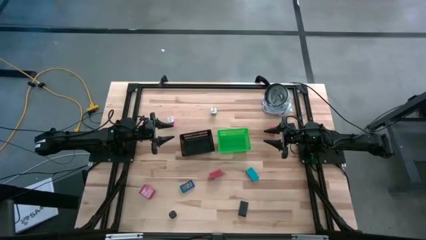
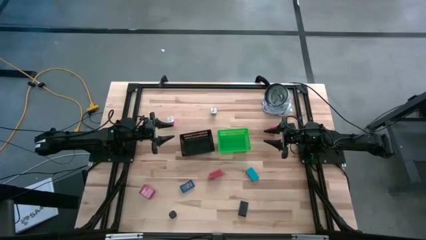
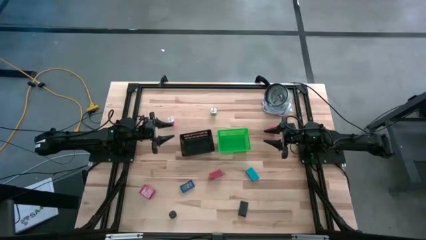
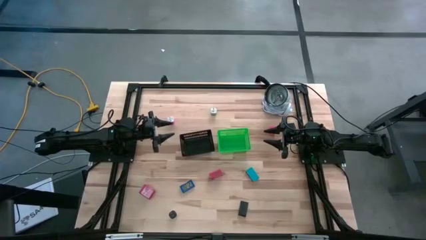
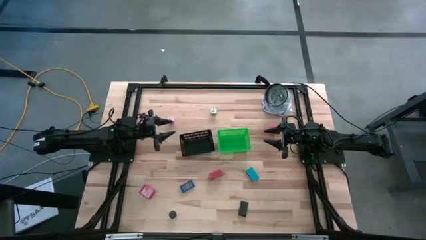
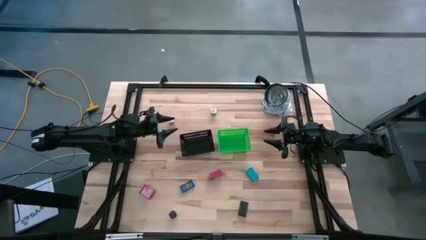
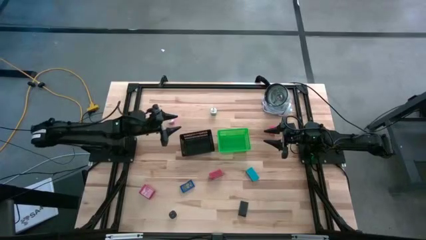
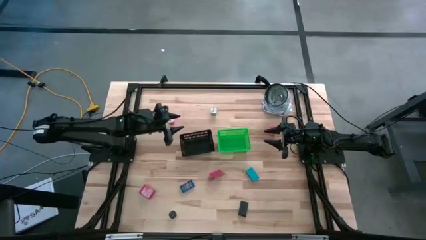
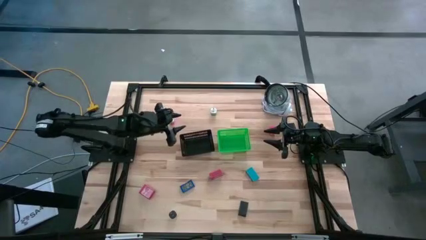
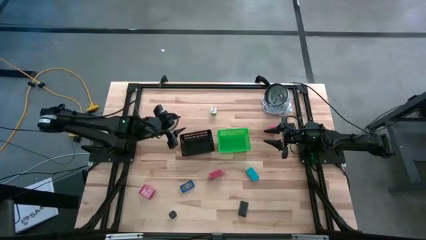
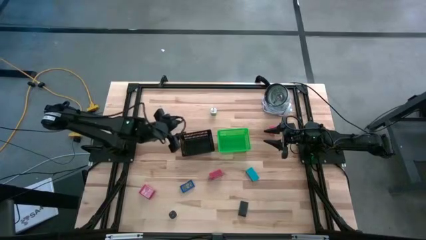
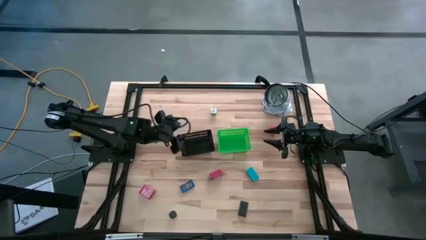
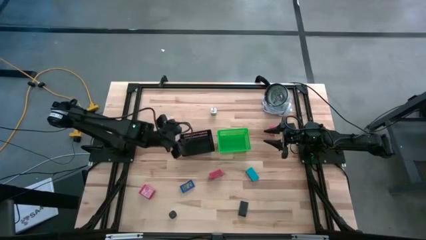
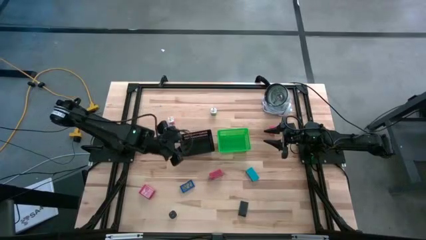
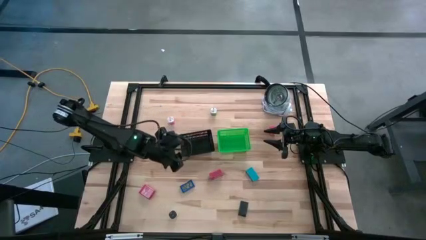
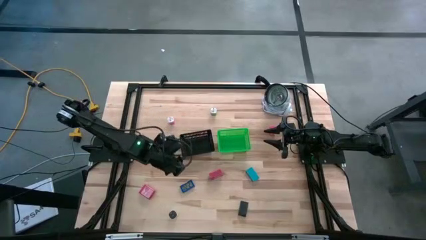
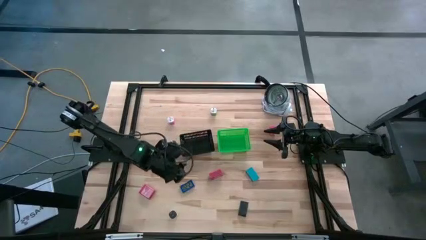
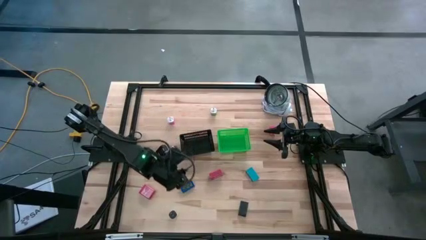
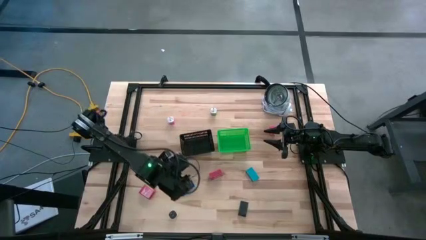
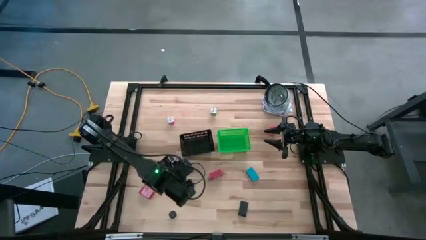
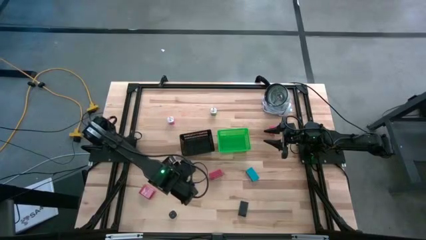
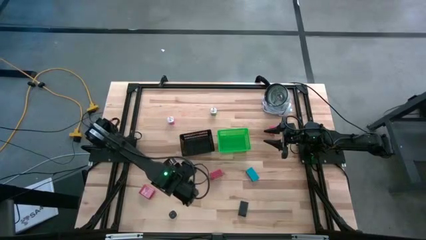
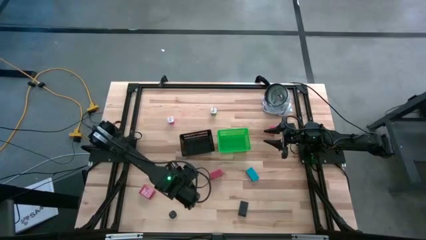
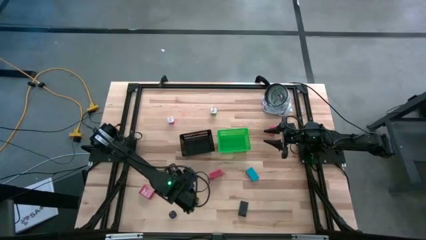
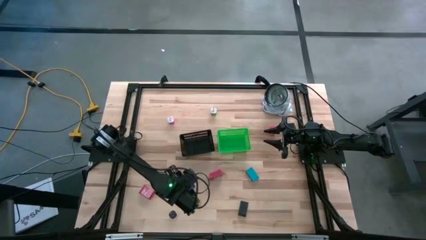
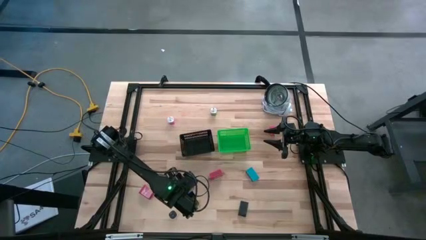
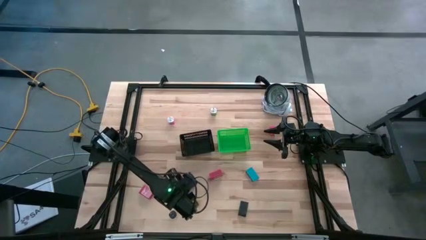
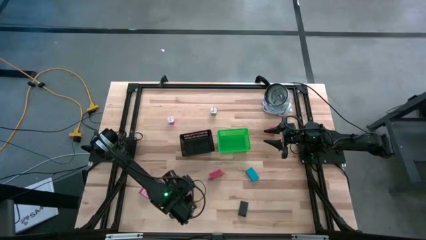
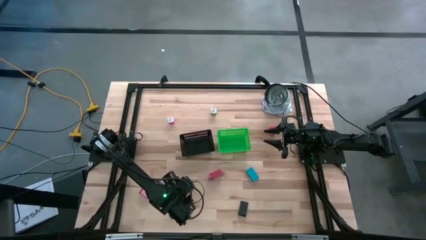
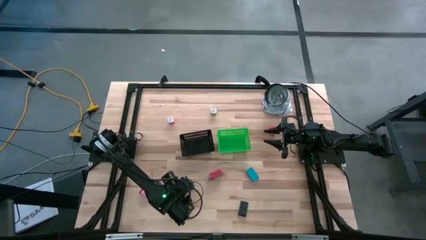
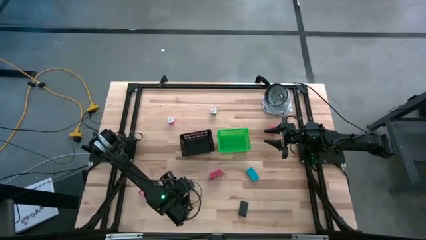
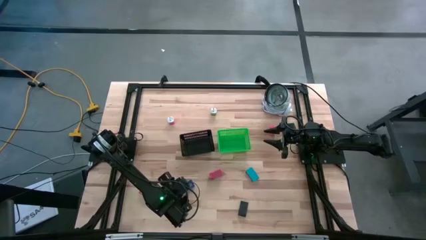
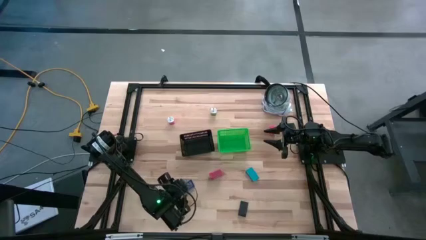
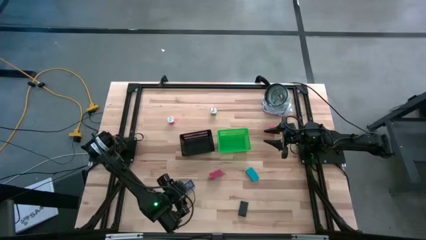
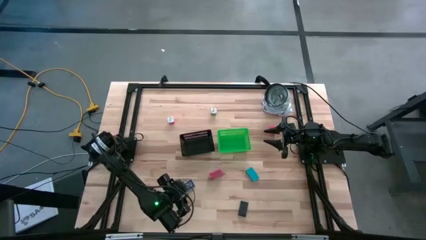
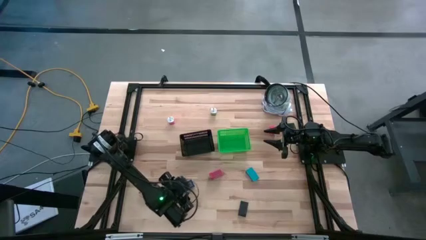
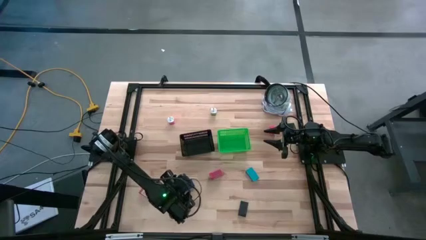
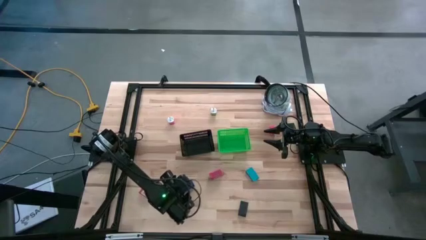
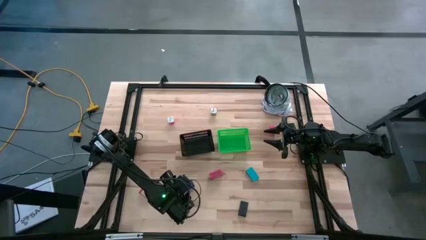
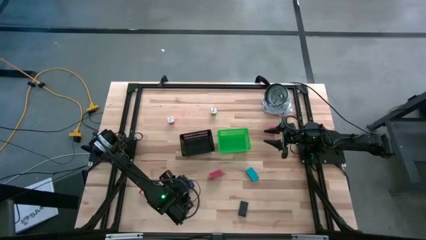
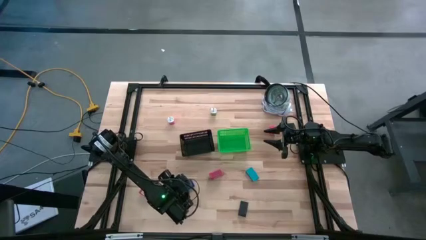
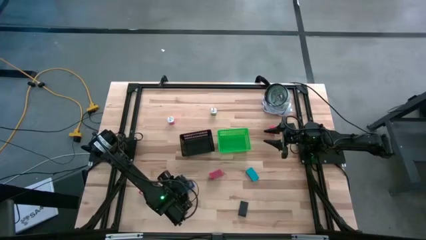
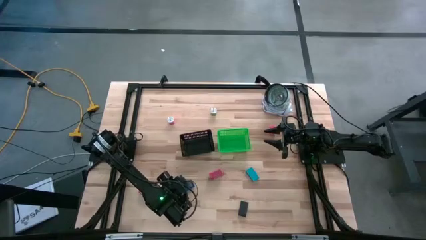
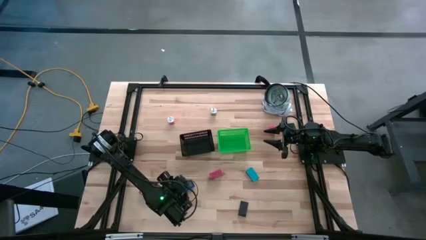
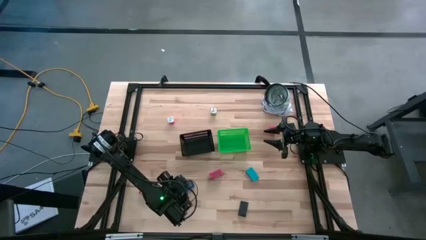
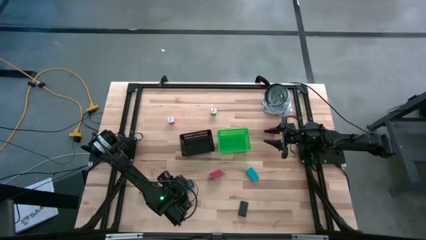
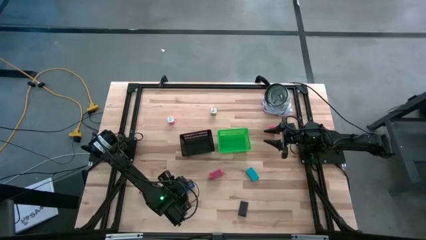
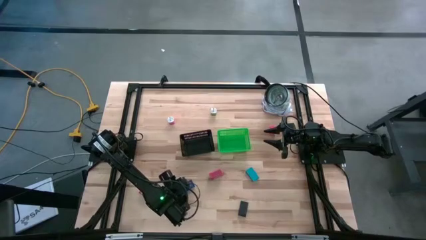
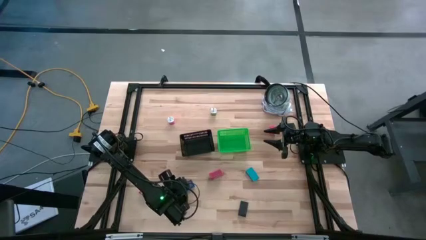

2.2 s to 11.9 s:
Task: Pick & Place Office items
Put the blue digital timer into the green bin

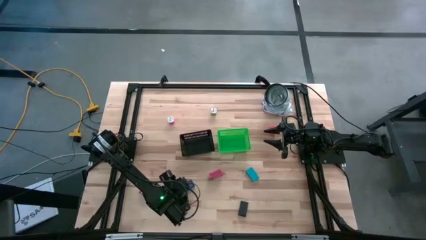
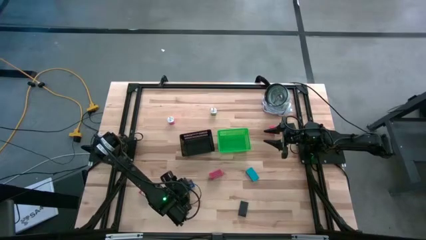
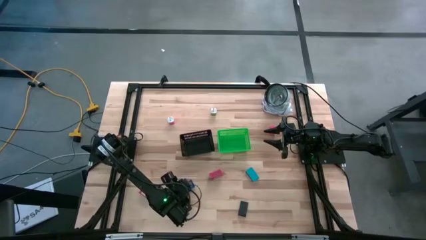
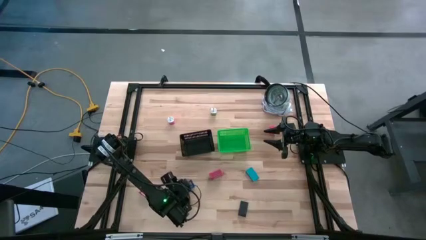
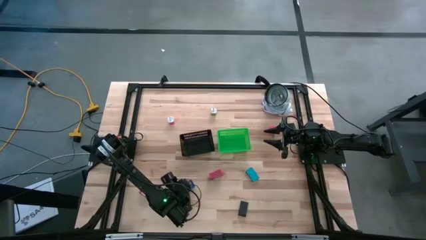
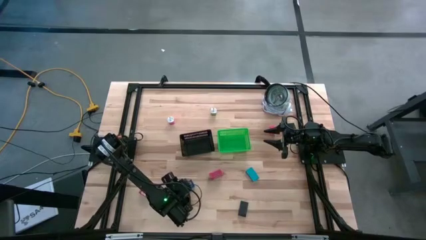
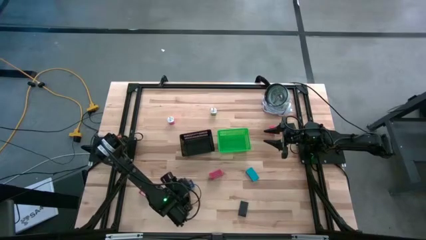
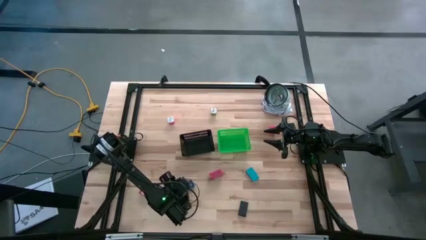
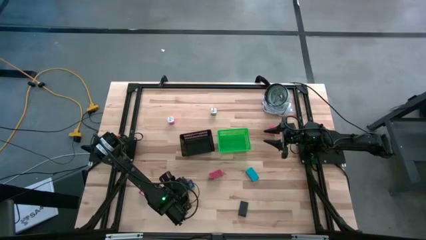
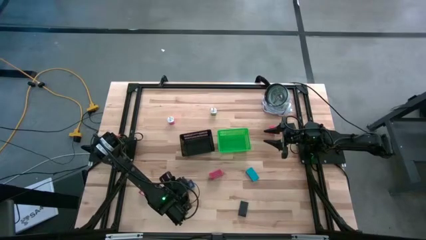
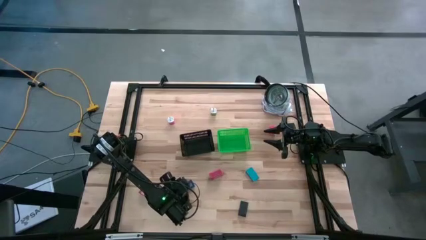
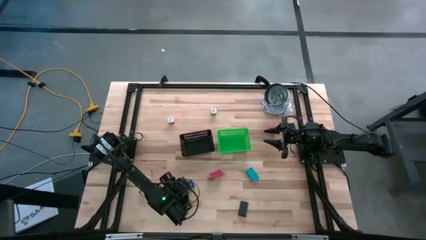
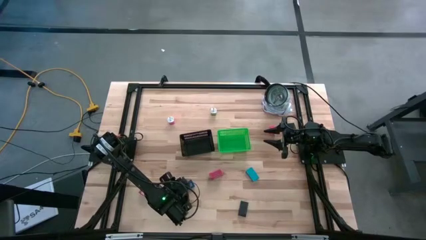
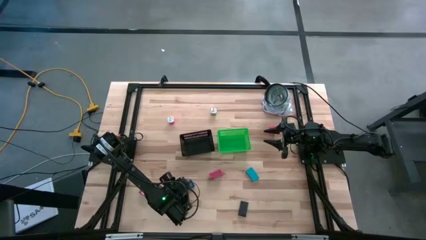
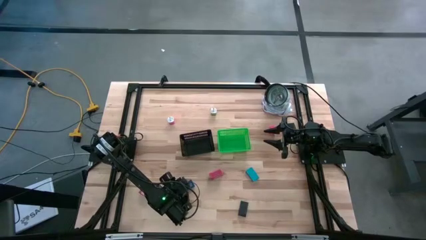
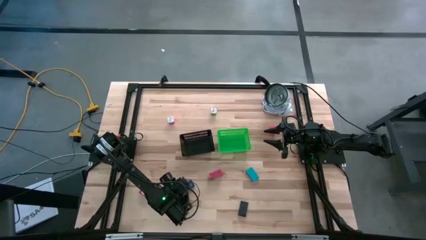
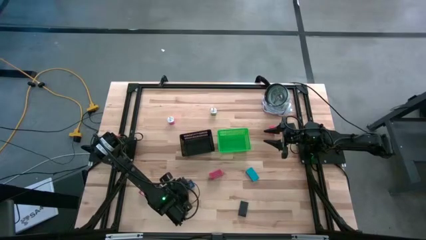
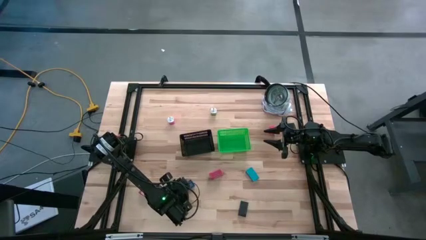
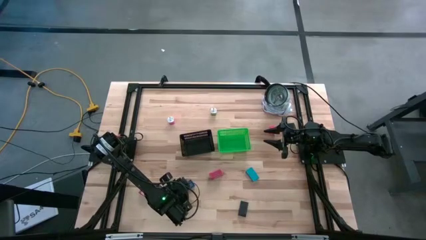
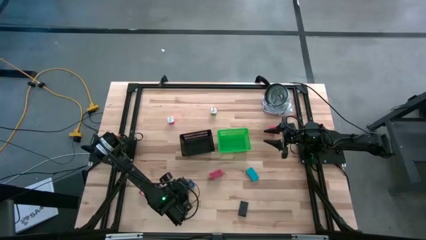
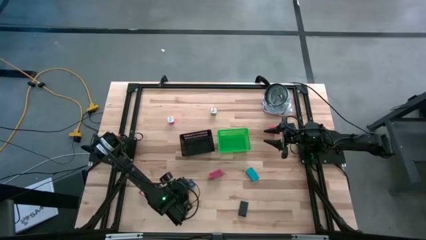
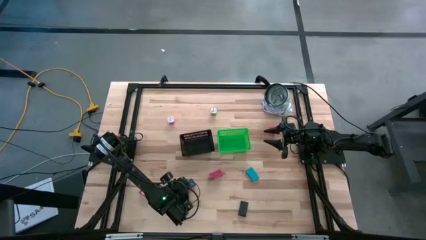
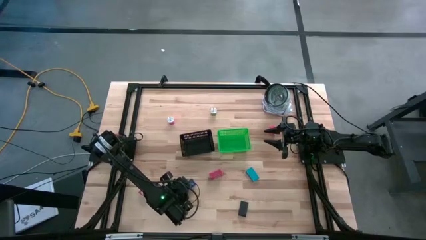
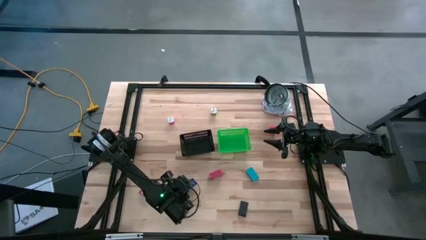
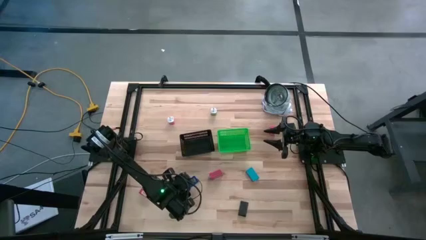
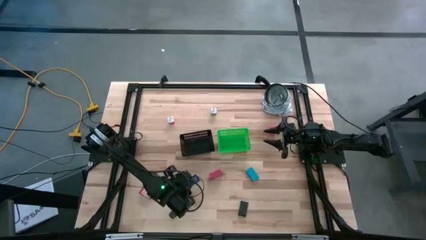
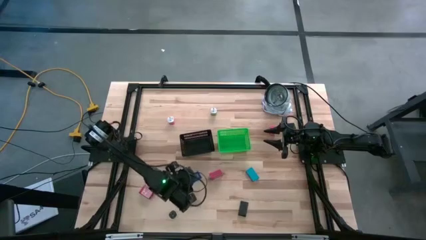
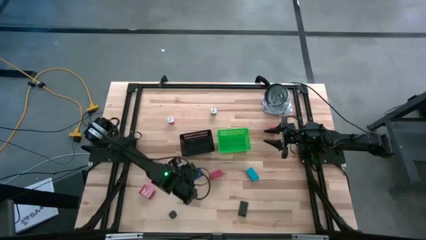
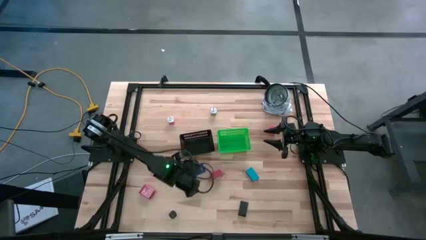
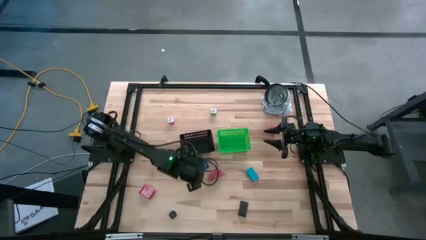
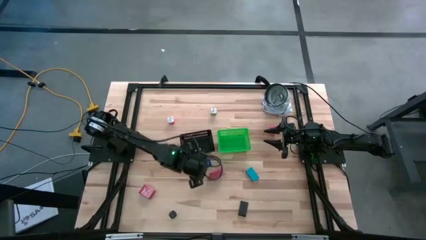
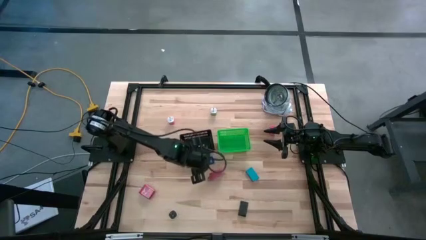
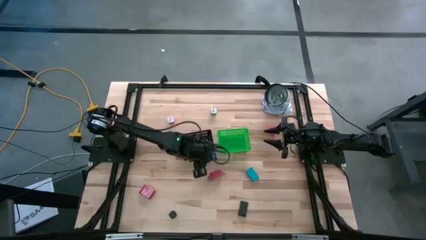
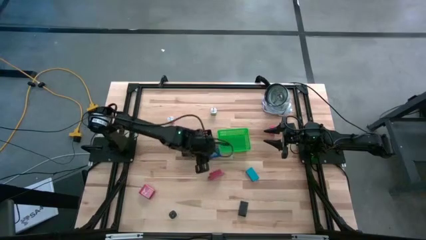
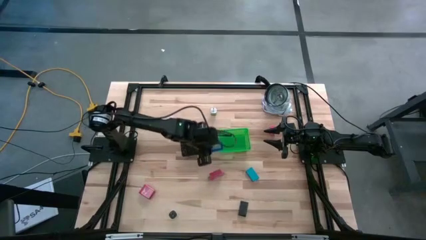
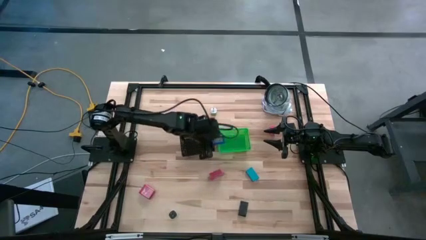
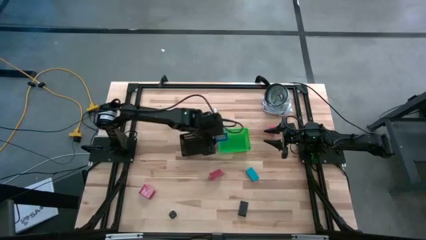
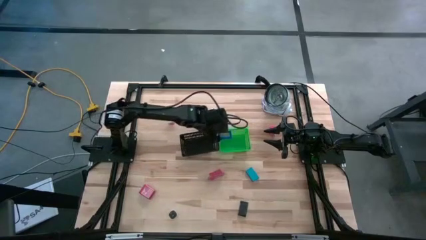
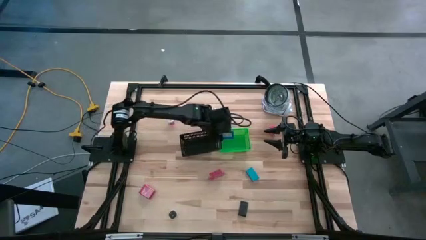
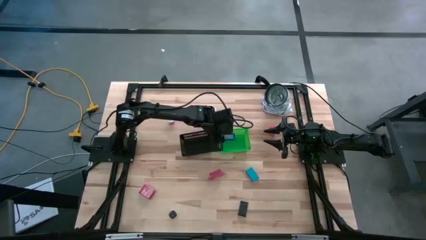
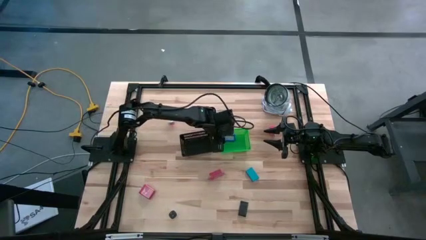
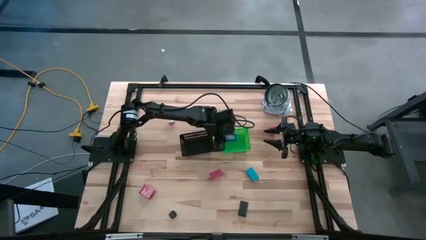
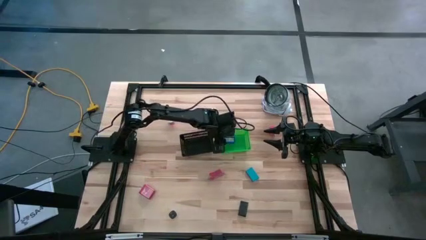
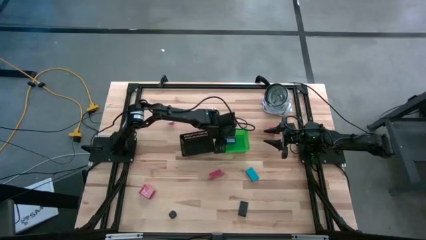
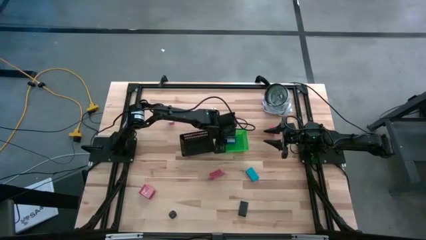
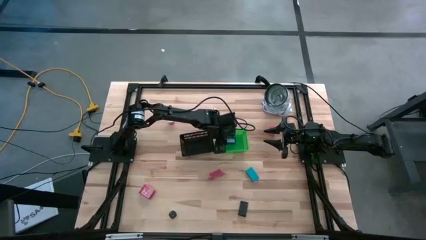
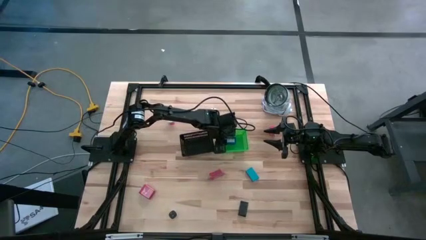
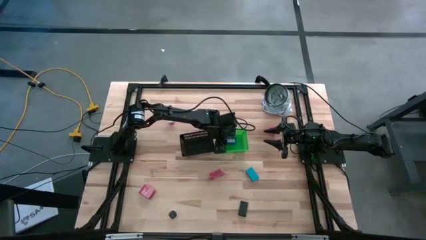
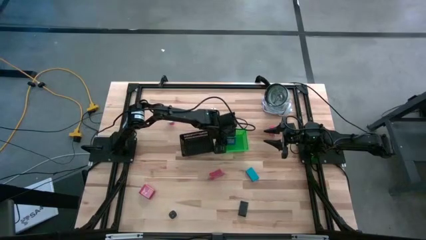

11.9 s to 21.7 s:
Put the blue digital timer into the green bin
